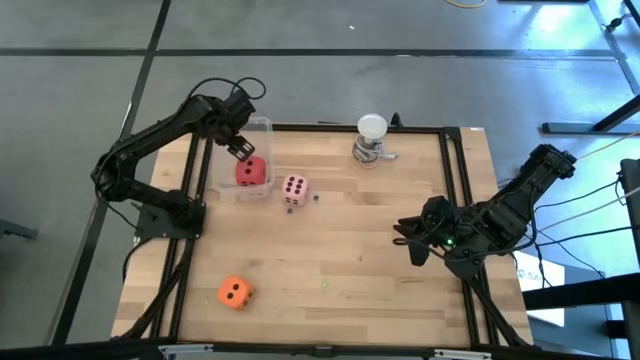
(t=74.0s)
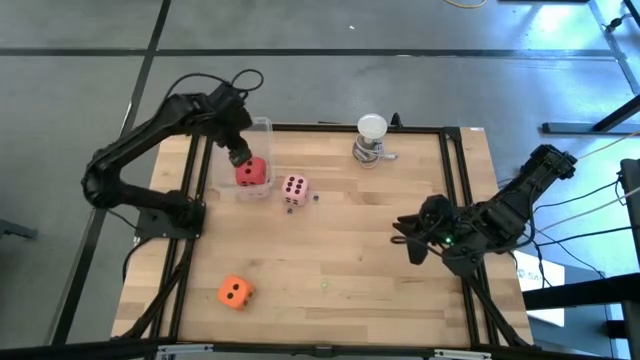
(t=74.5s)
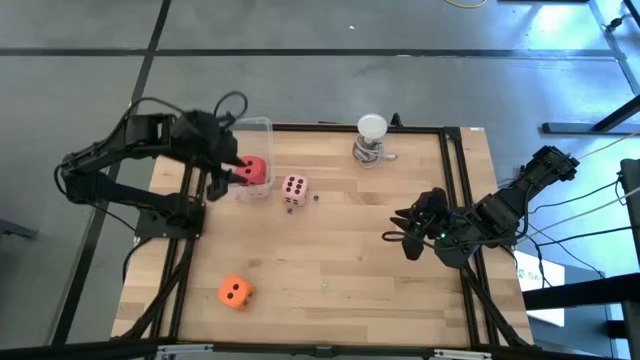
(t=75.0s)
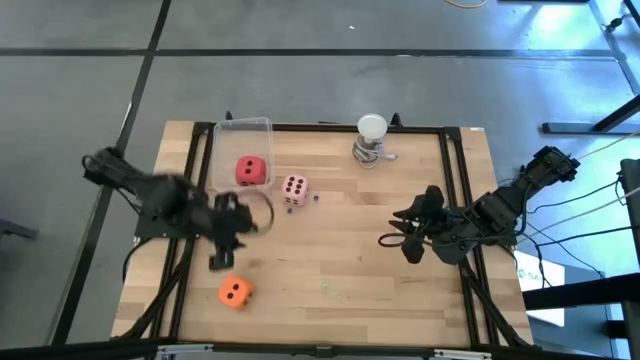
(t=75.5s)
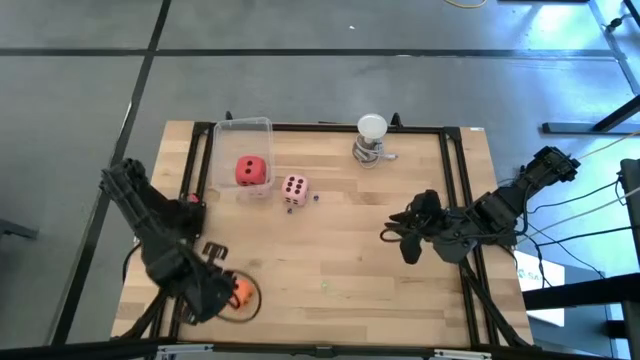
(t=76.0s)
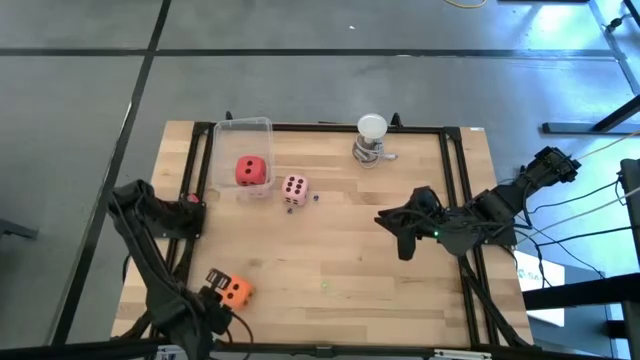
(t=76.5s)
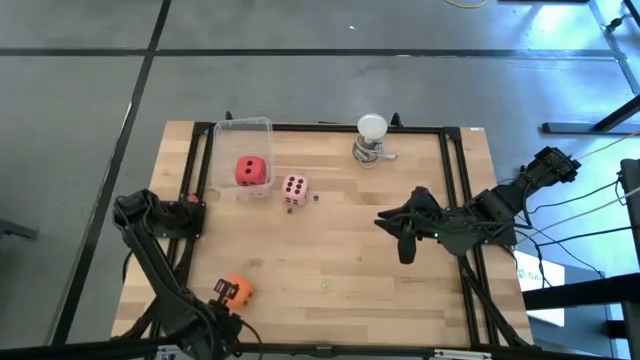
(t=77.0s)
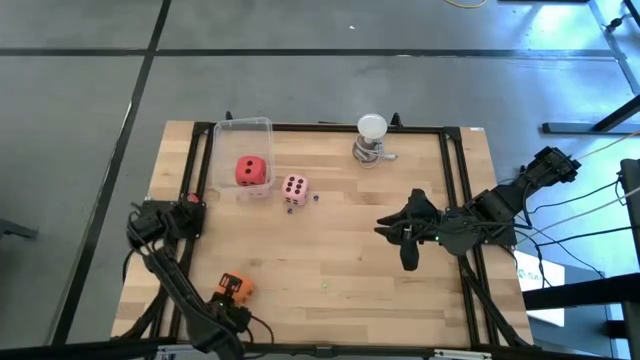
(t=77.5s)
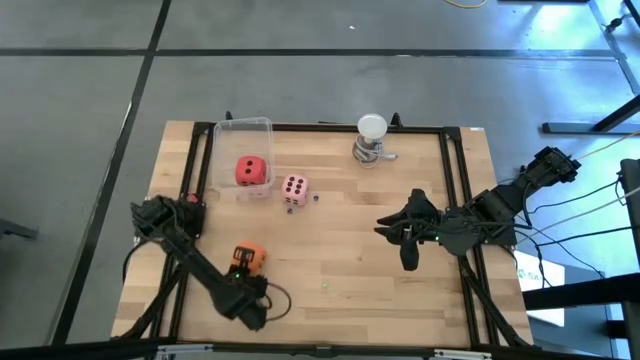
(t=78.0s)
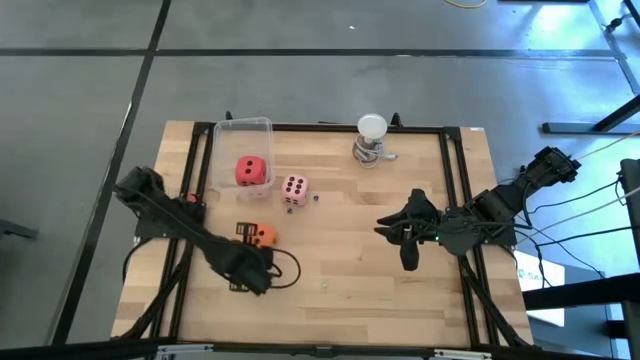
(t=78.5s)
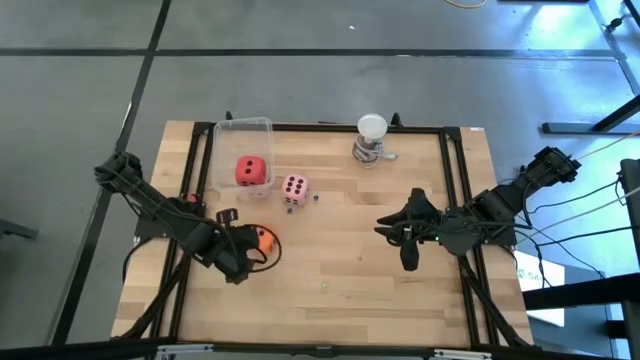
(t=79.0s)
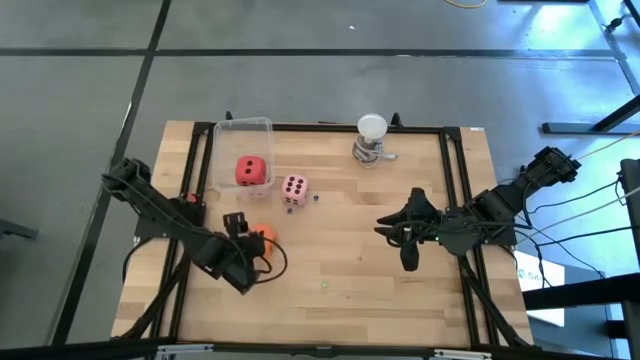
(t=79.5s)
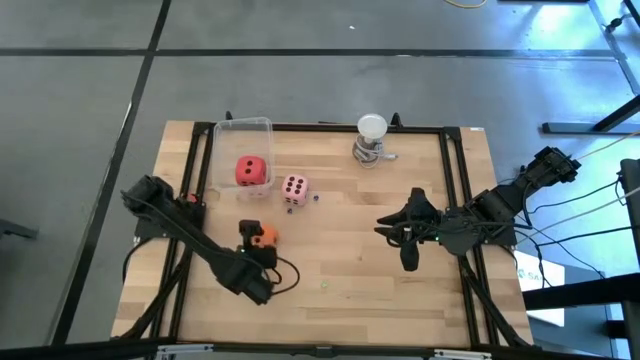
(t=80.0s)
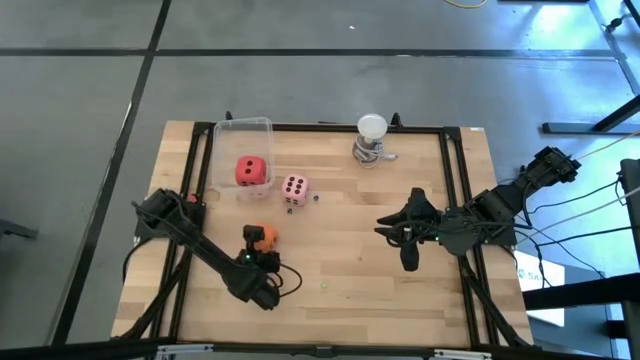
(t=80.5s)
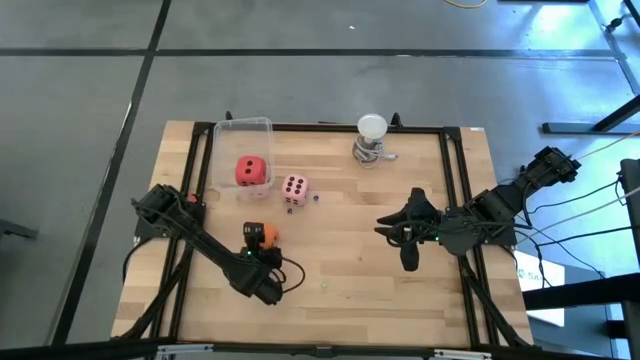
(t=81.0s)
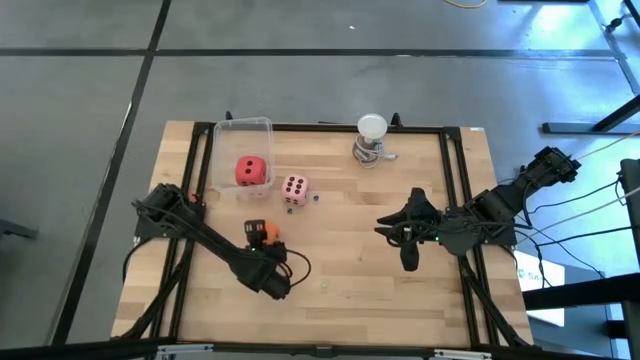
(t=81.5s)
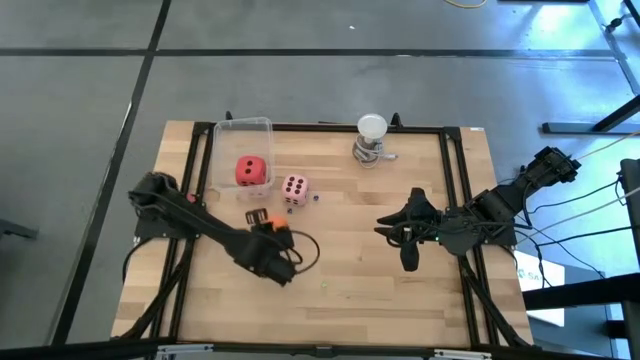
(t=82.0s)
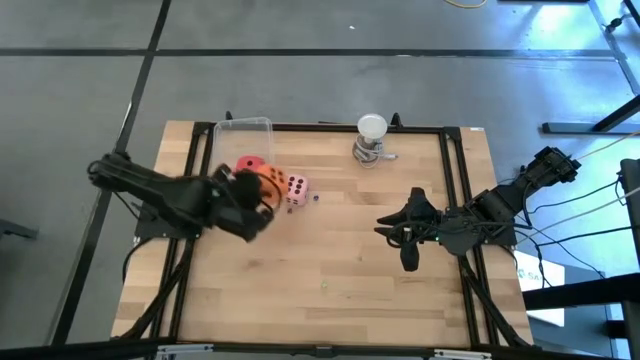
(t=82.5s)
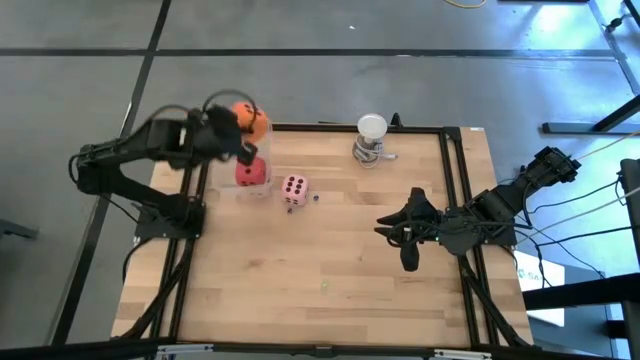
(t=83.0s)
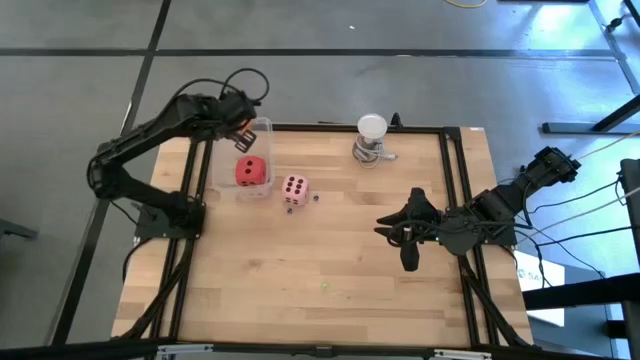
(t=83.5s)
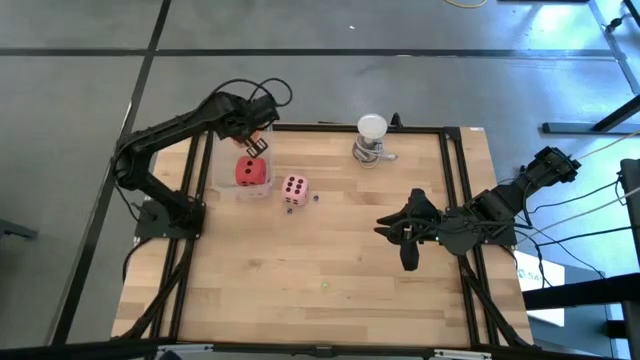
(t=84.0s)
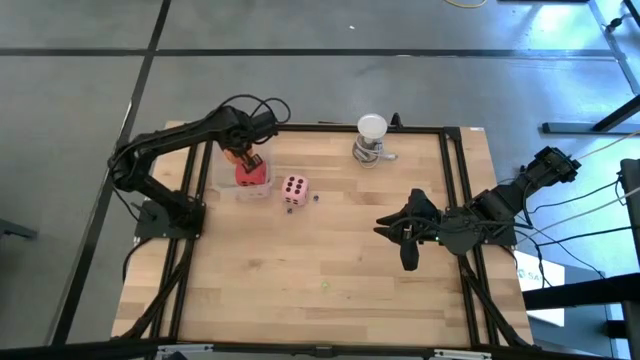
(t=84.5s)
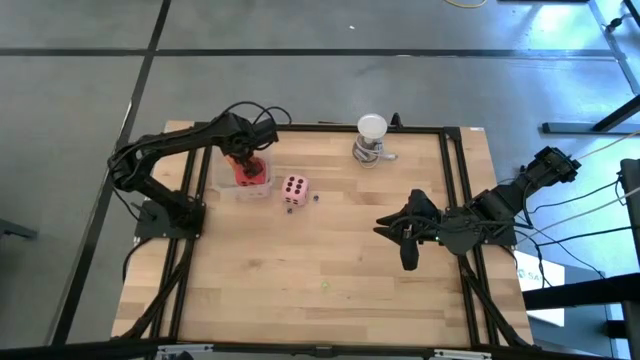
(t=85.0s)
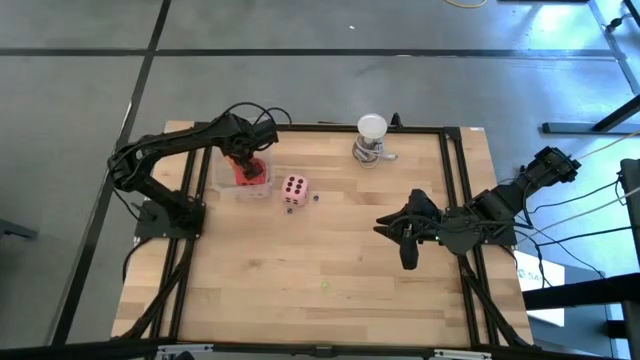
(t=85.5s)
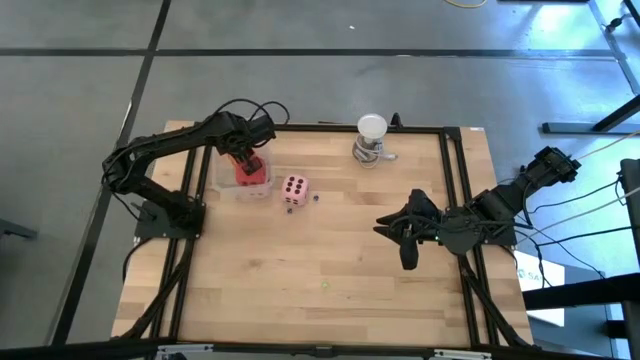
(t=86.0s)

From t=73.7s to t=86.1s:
Task: Pick & Place Dice
Put the large orange dice into the transparent bin

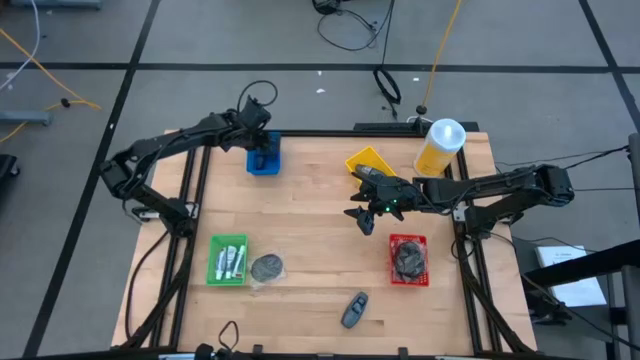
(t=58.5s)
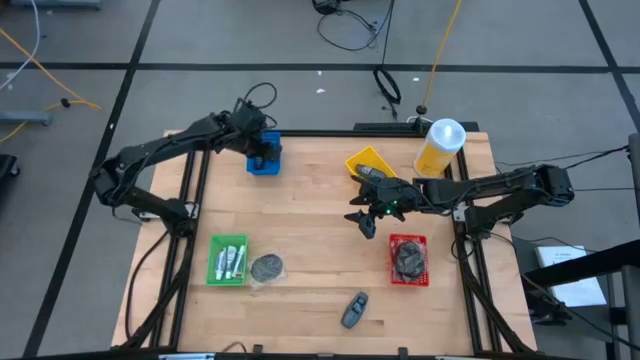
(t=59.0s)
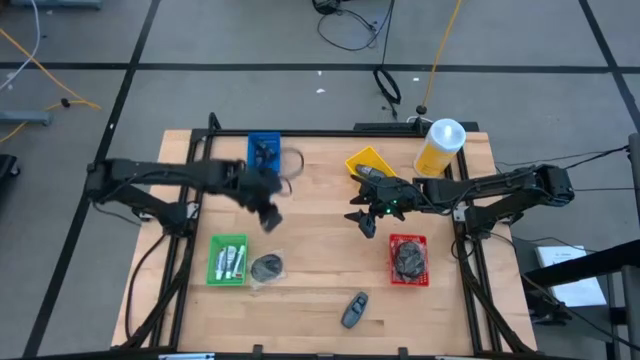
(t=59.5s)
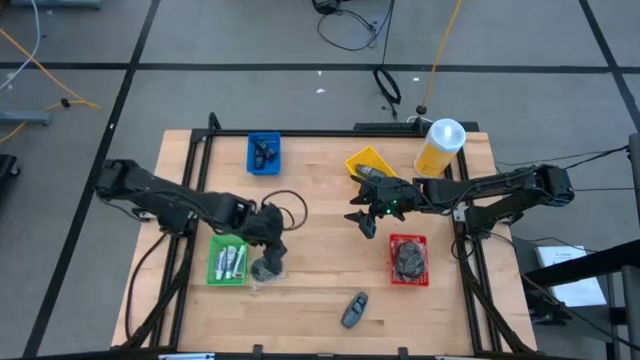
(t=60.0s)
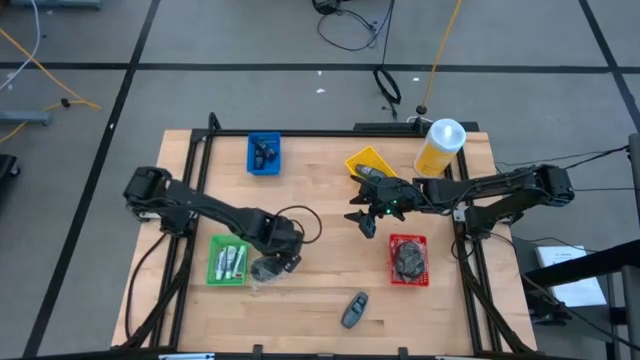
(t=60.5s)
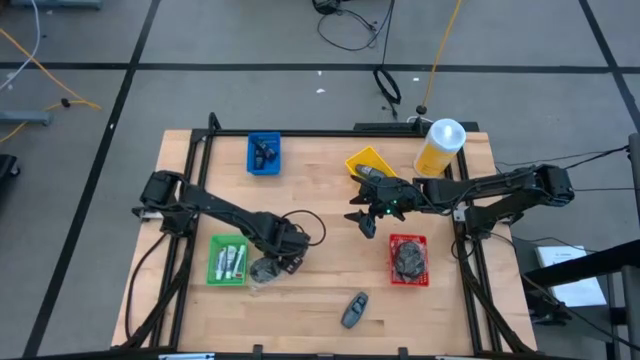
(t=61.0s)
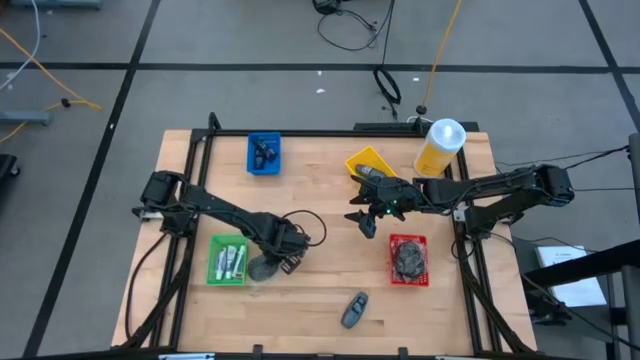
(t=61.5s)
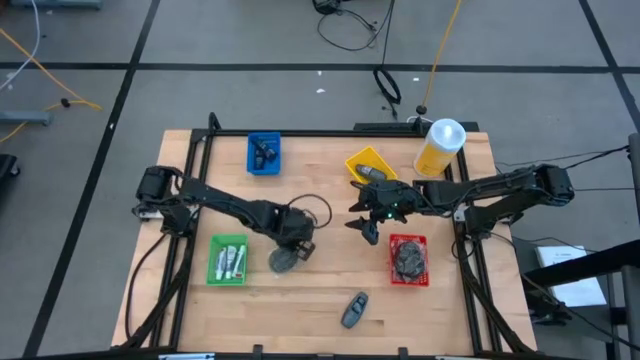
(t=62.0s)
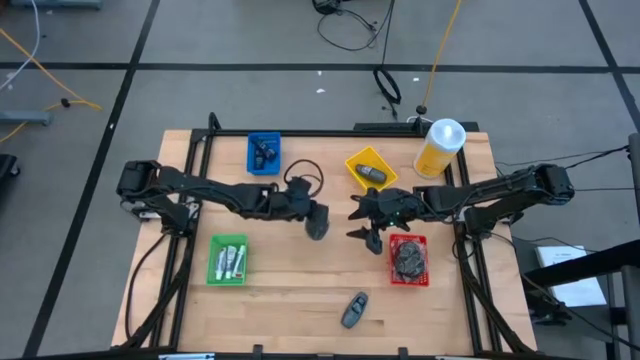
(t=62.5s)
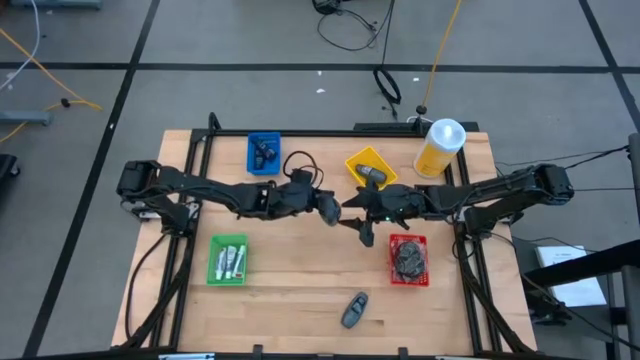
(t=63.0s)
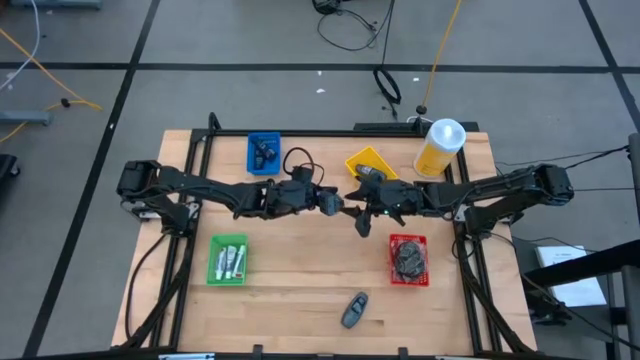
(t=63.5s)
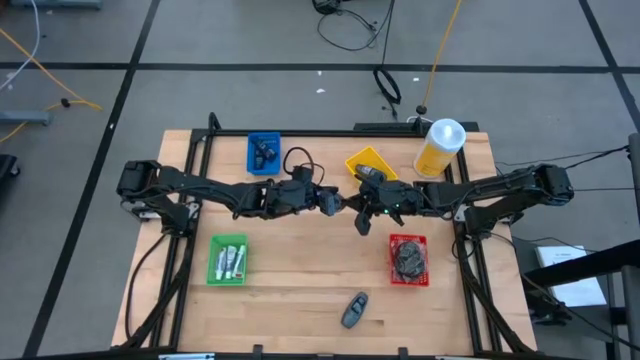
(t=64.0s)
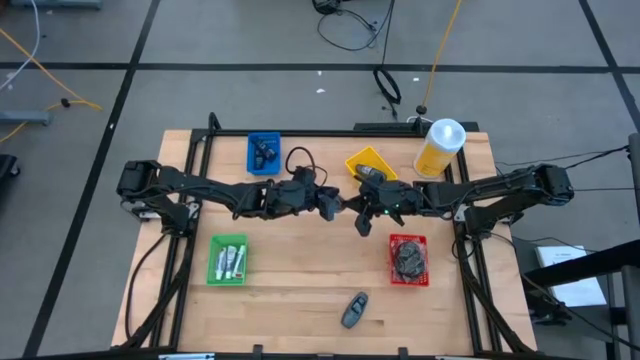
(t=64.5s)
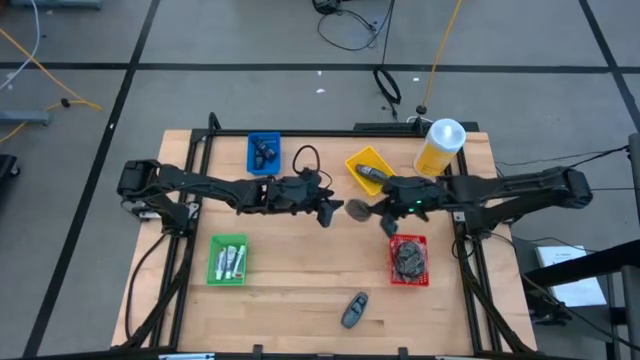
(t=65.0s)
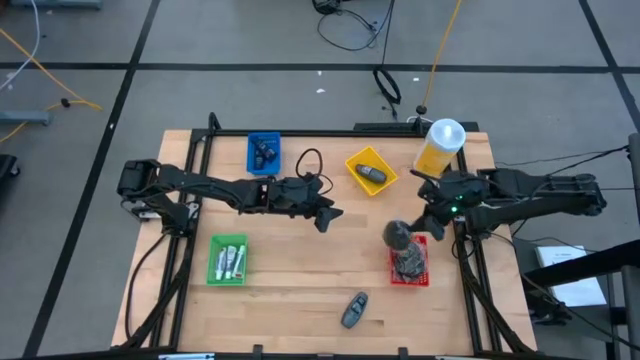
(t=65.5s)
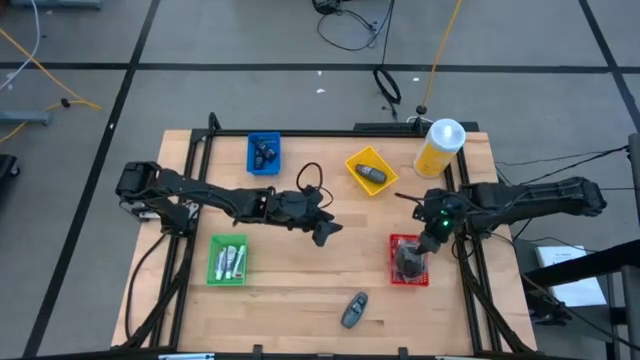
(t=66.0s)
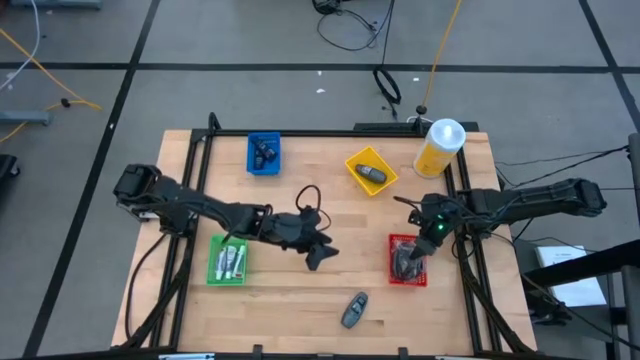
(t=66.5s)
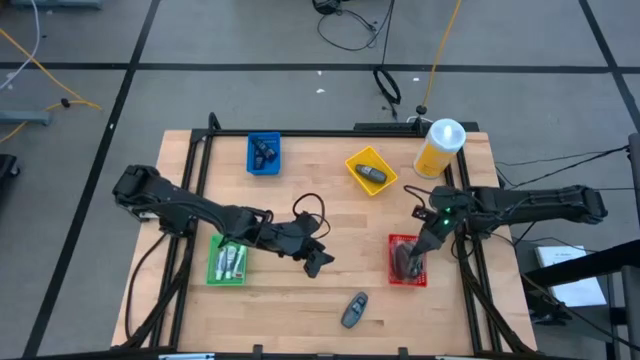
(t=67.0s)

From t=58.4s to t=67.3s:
Task: Pick & Place Travel size toiletries
Put the black hairbrush into the red bin

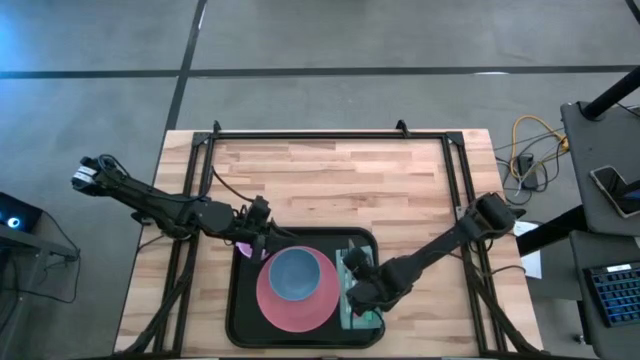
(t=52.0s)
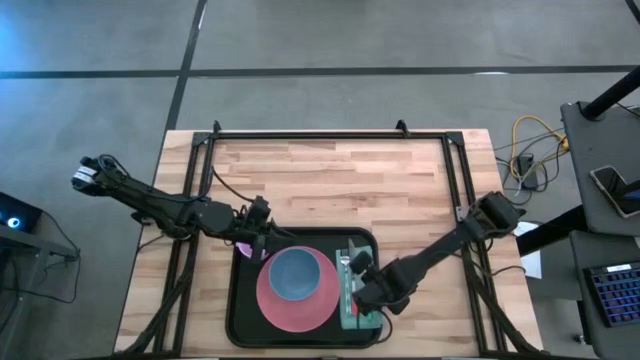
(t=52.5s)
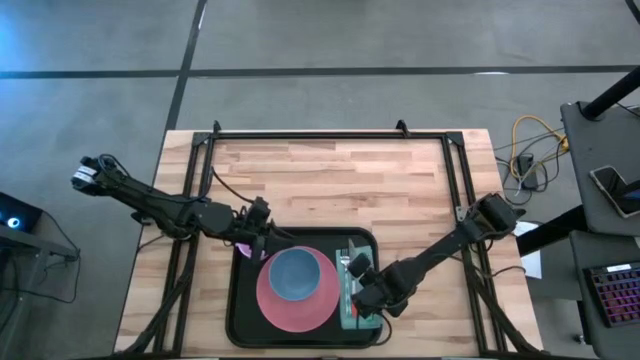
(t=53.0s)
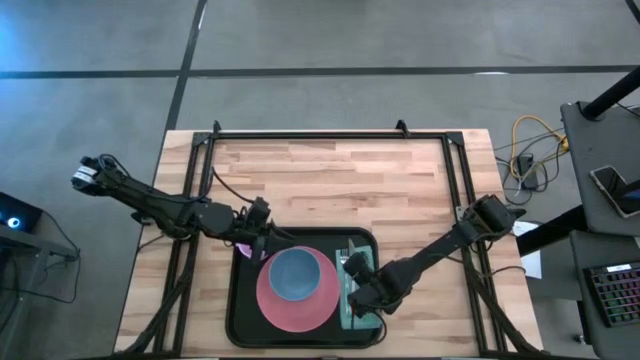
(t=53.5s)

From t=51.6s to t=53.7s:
Task: Set up tray
Adjust the green spoon
